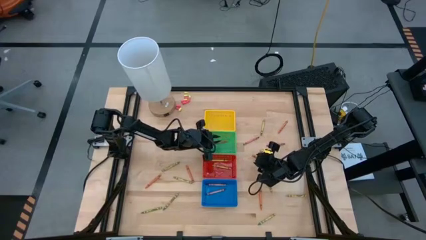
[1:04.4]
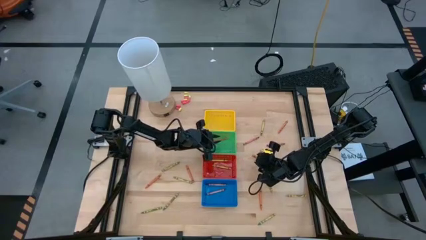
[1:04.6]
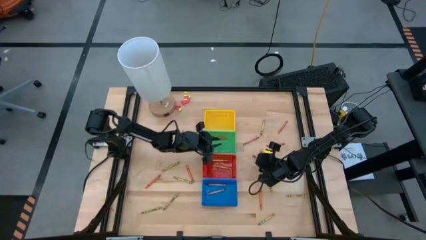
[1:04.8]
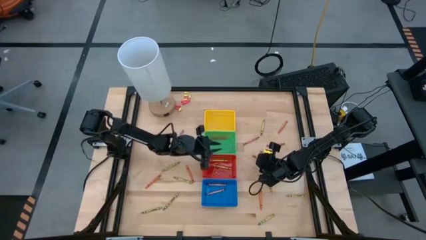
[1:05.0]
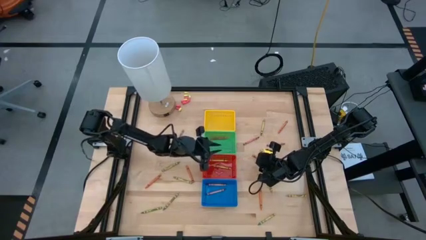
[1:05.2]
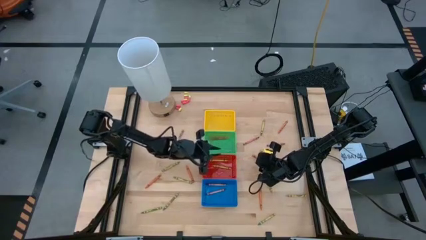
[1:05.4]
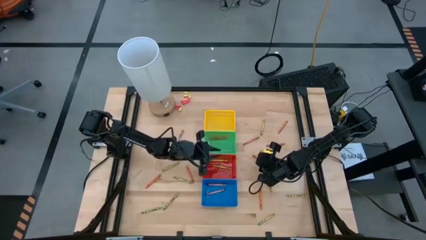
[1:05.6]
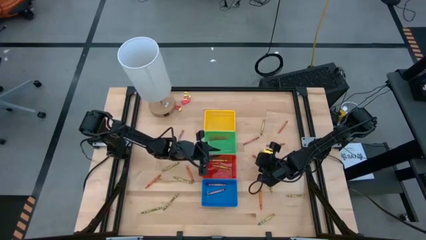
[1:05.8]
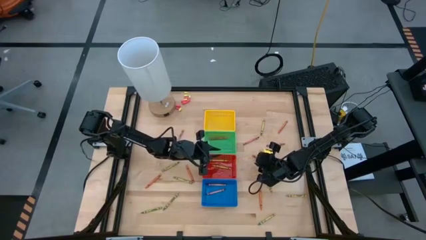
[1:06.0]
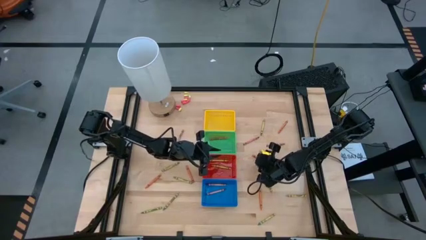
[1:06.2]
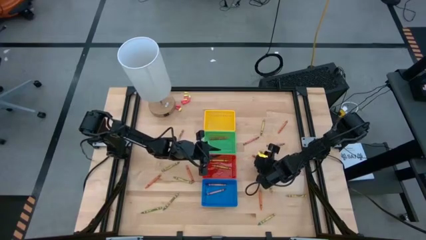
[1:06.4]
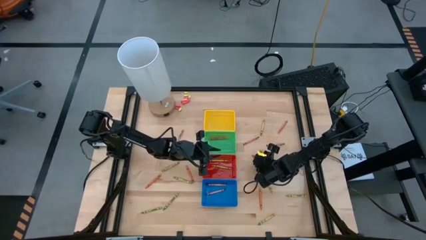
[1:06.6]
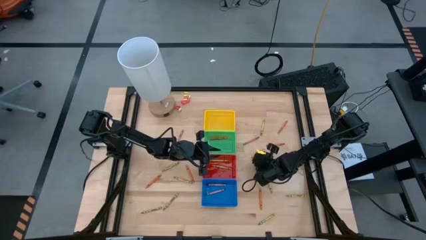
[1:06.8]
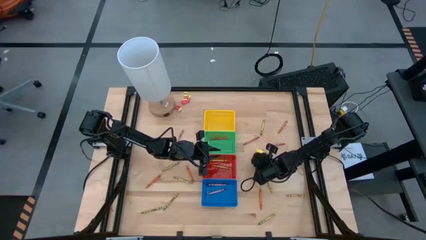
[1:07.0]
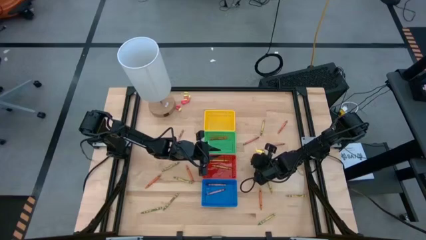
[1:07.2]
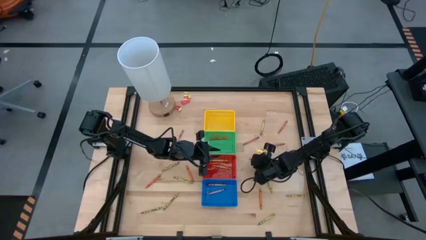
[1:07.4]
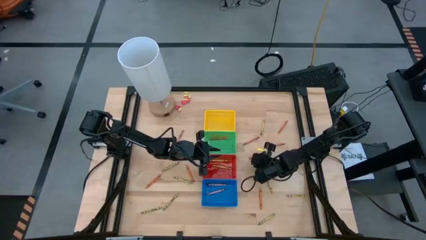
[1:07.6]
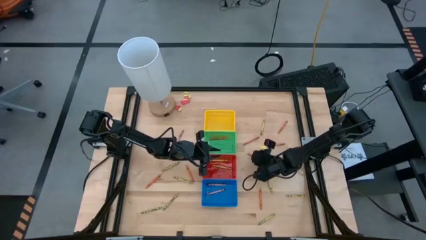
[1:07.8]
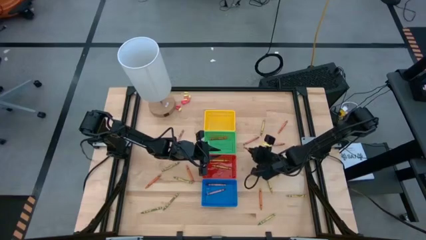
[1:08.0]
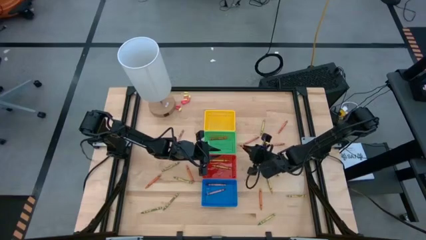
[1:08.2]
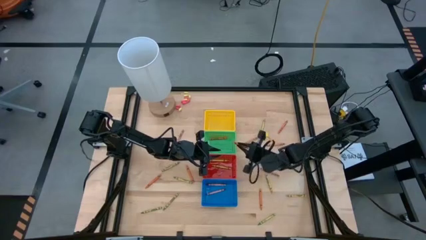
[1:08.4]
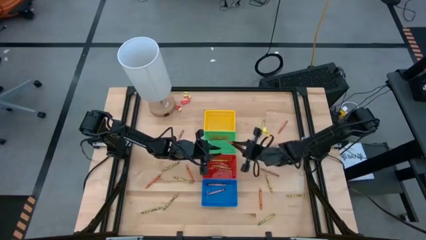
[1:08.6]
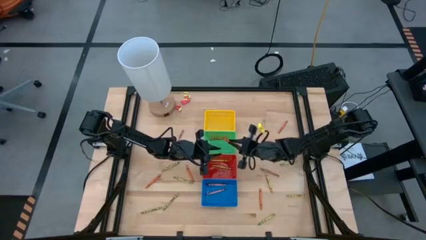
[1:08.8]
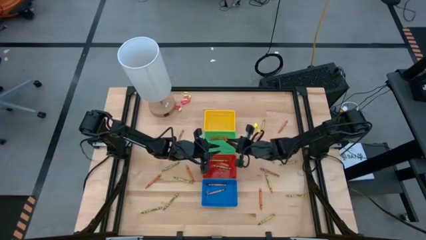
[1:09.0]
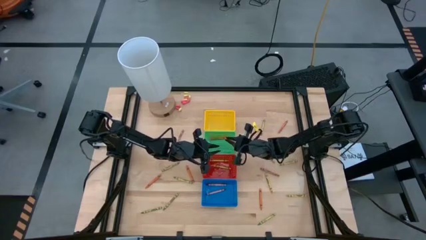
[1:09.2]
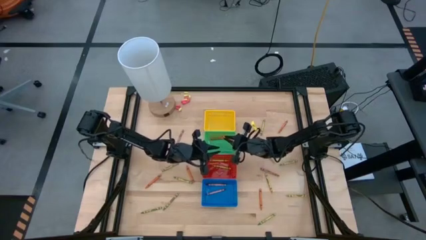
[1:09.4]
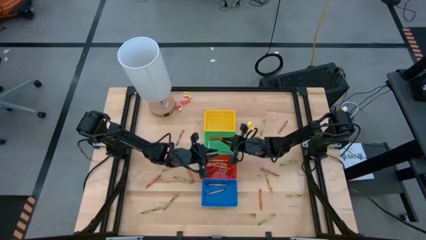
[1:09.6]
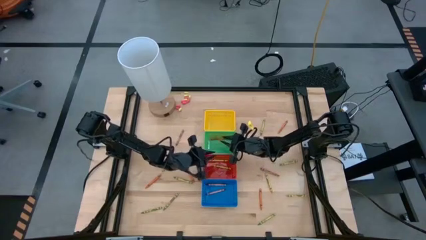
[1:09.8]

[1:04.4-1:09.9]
Task: Sort crayons
Put the orange crayon into the green bin

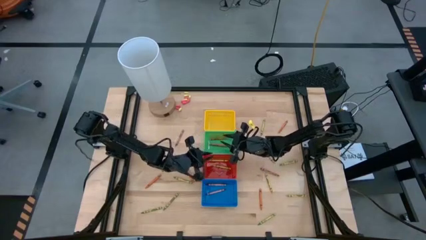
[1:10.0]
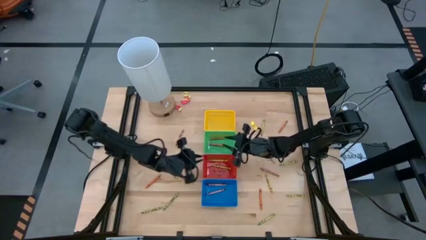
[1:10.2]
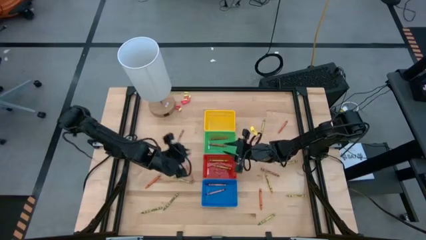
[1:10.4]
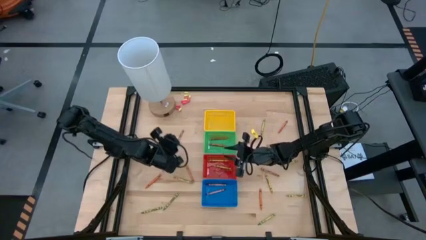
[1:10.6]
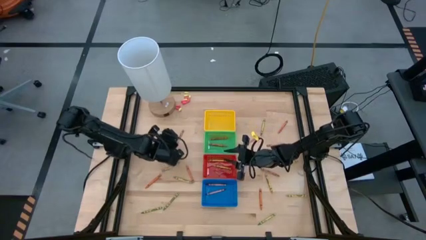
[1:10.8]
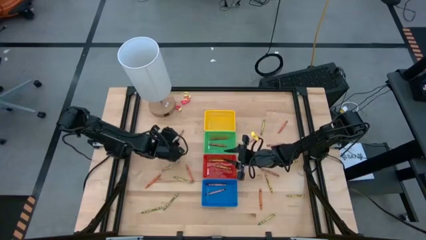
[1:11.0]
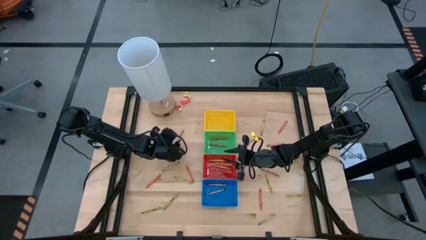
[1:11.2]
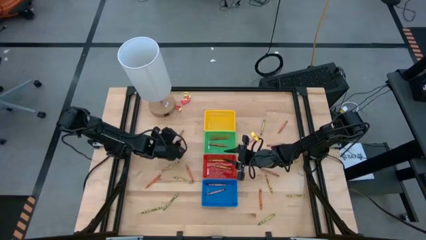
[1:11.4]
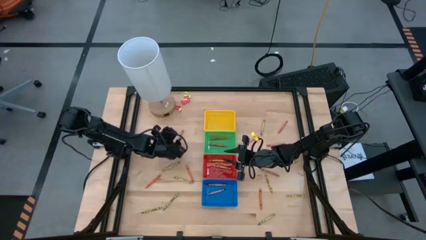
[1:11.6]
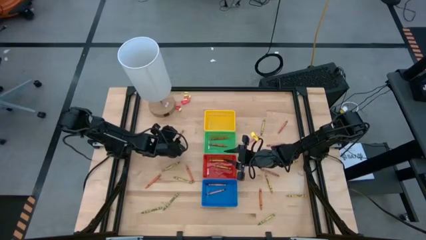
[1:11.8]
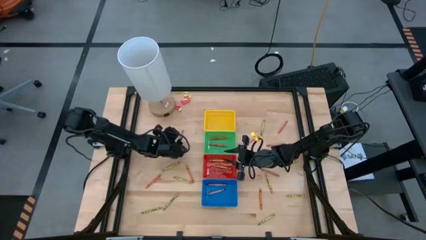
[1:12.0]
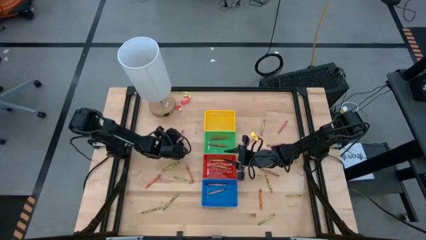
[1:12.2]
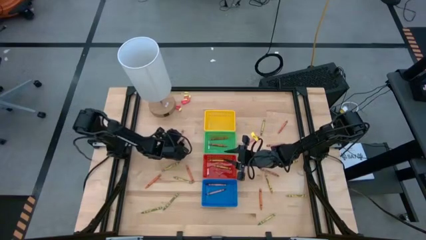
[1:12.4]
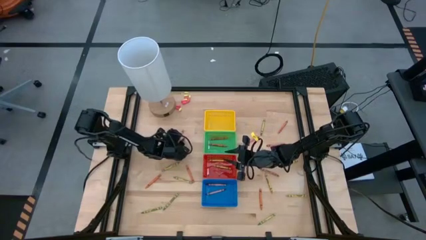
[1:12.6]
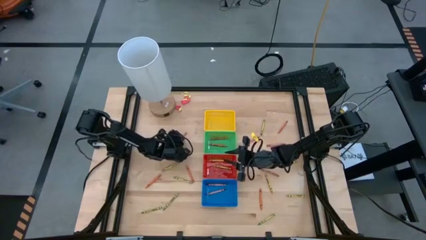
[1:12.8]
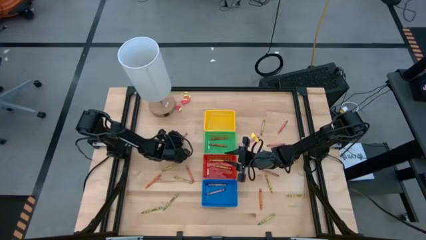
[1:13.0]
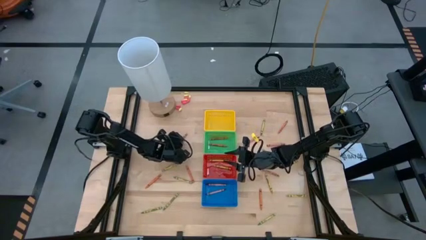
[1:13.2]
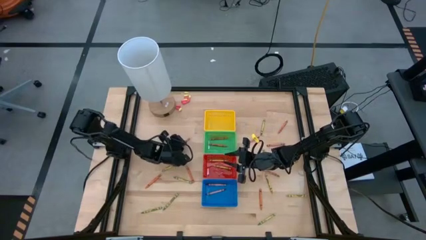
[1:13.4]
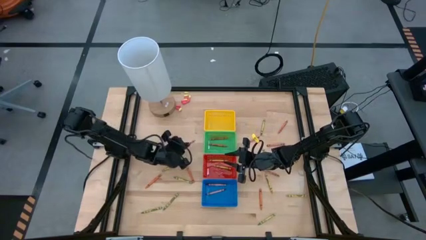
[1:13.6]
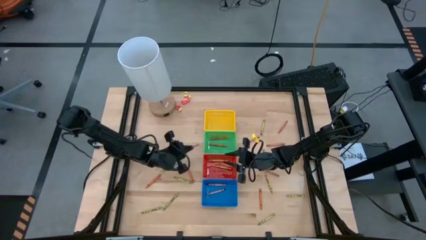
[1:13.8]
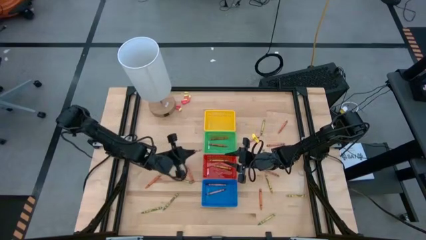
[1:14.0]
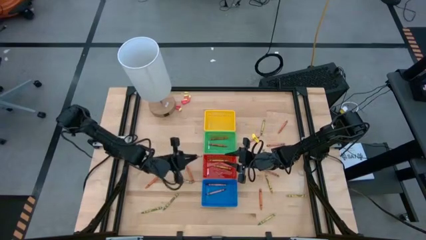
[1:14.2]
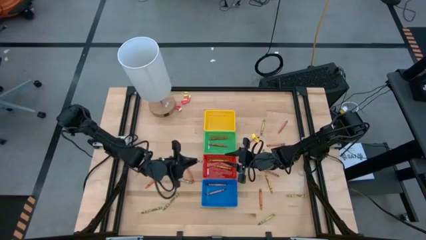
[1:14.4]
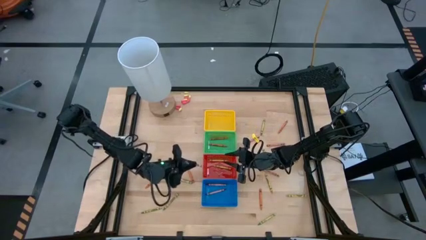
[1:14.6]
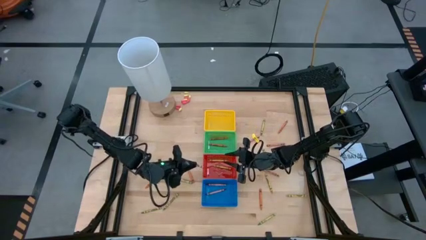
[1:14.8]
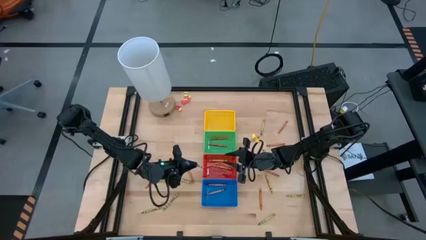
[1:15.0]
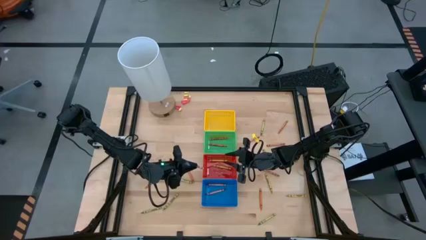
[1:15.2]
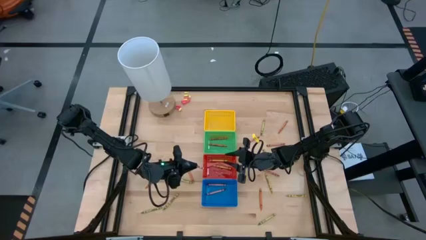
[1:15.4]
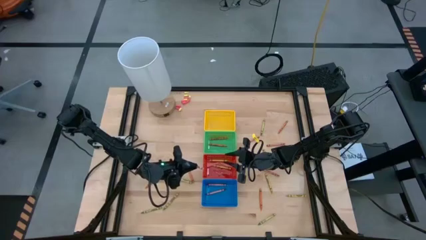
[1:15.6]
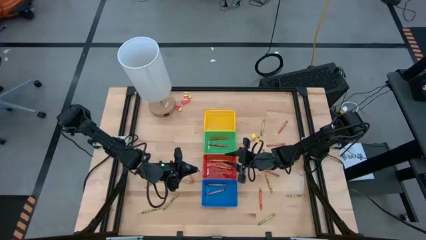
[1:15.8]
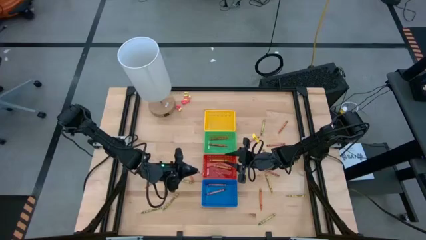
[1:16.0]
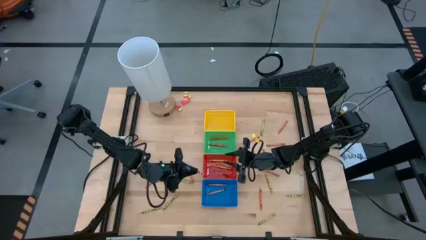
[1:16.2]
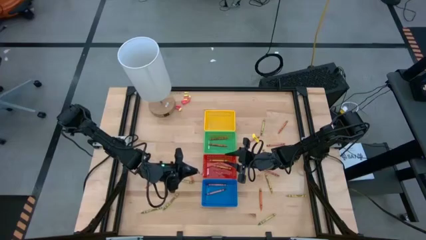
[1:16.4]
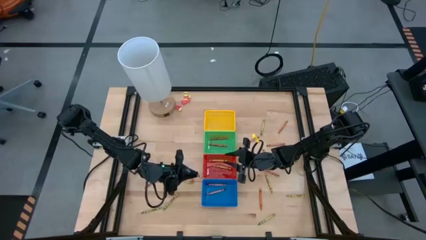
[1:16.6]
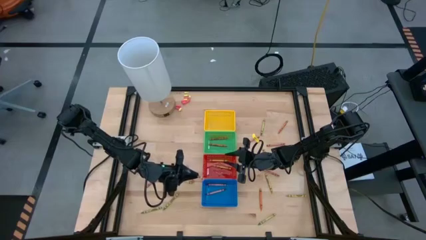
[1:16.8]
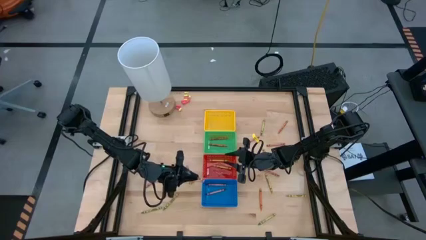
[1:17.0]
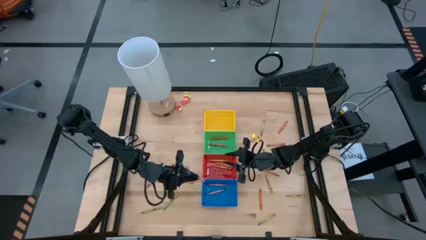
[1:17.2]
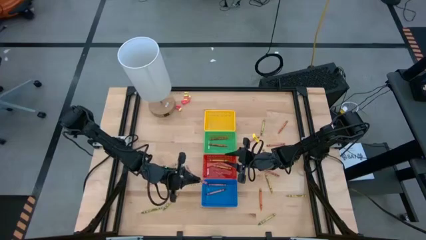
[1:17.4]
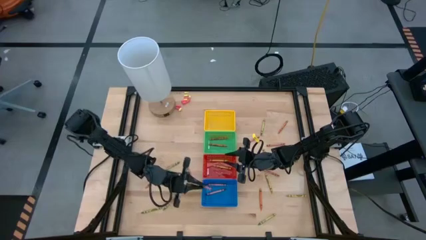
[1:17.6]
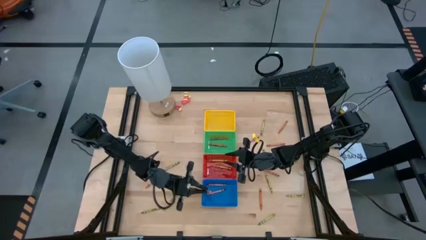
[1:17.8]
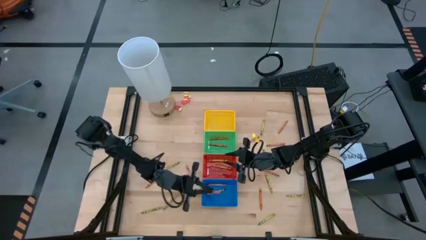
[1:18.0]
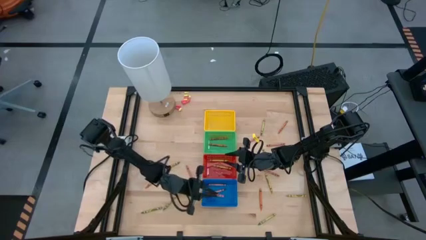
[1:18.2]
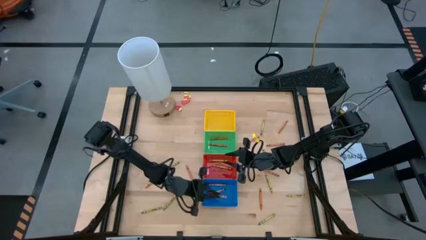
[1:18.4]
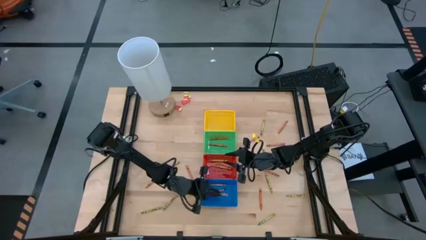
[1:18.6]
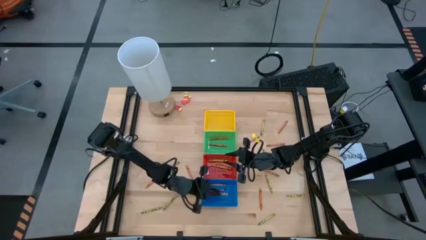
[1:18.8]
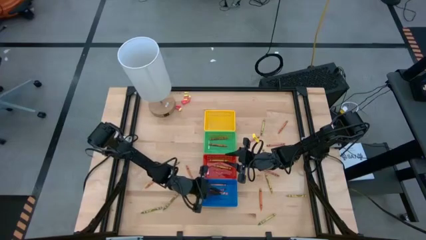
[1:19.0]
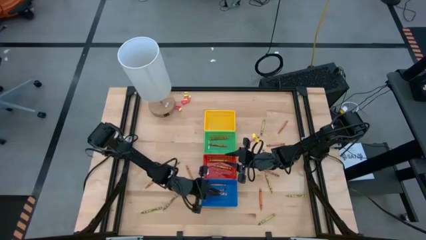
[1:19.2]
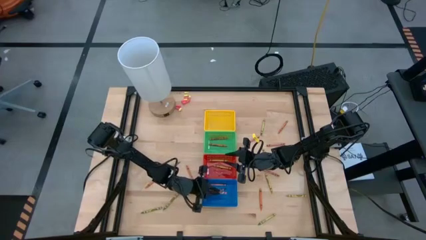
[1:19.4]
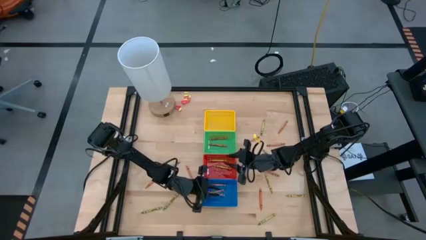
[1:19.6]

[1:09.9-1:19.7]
Put the red crayon into the blue bin

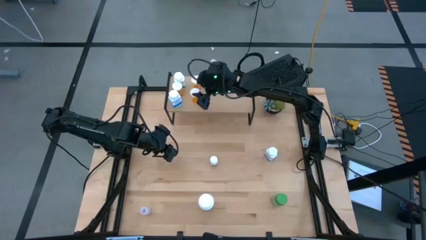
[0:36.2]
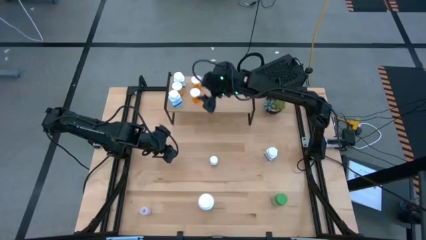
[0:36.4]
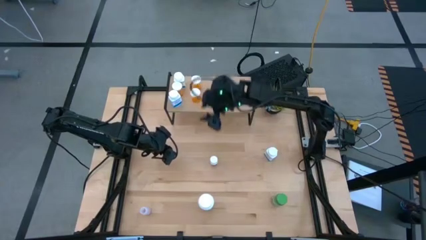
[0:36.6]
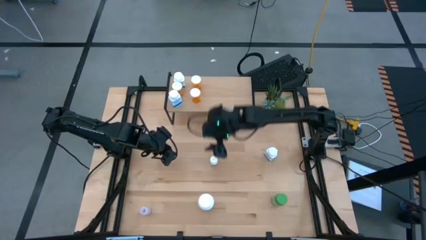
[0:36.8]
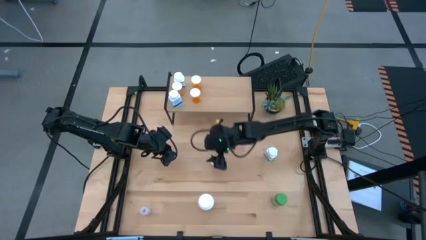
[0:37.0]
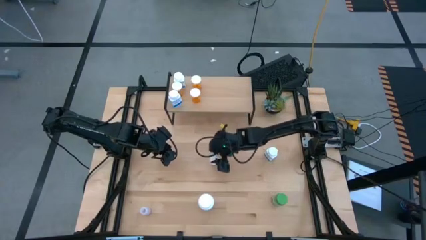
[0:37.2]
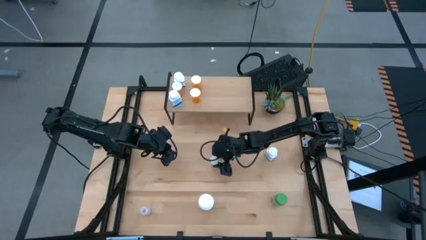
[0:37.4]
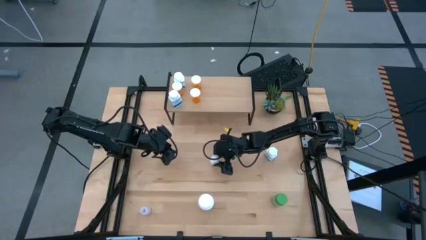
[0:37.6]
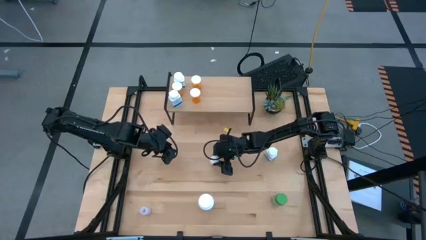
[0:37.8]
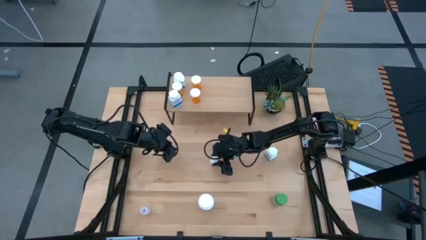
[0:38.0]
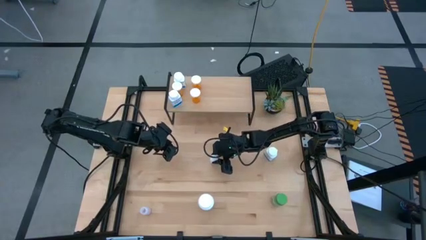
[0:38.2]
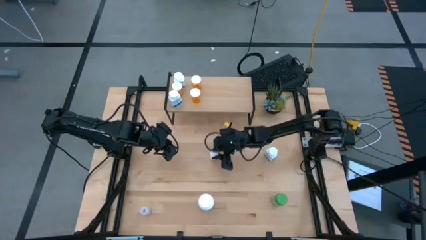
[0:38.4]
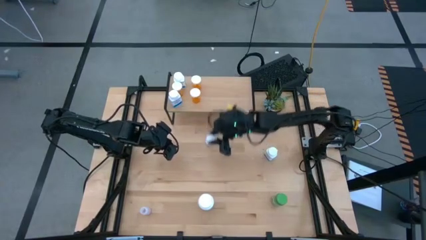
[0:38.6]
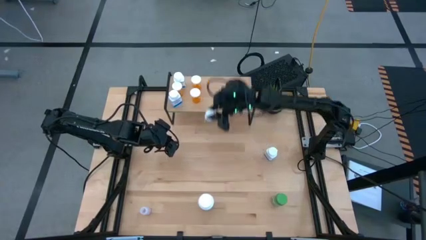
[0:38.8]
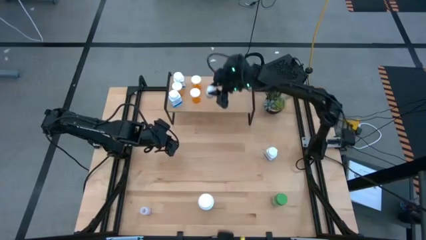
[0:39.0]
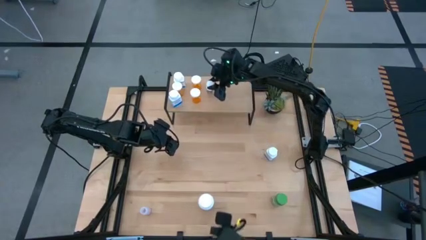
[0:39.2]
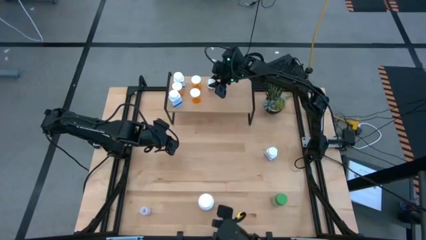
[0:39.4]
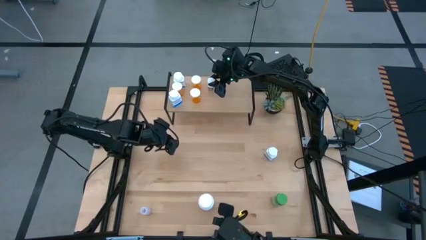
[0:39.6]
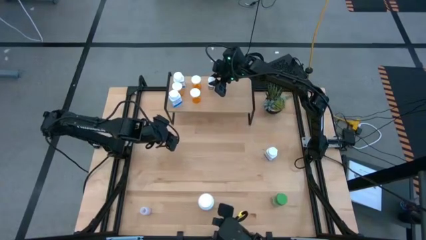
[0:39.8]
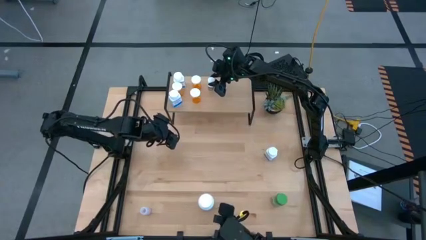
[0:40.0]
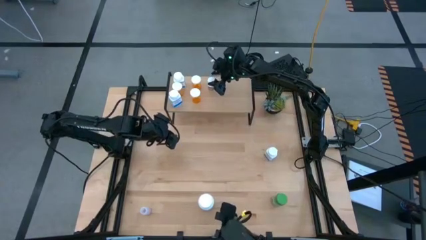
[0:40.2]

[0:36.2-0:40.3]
Task: Pick and place medicine bottles onto shelf by color
Put the small white and black pill bottle on the shelf
